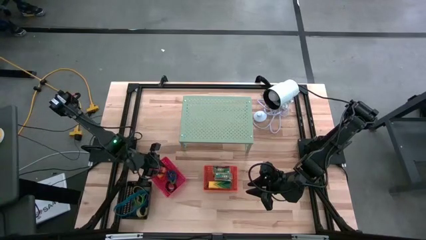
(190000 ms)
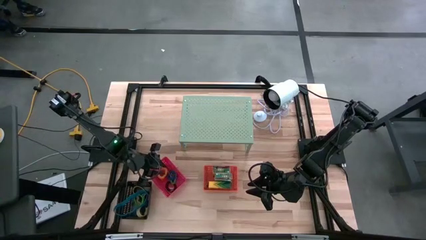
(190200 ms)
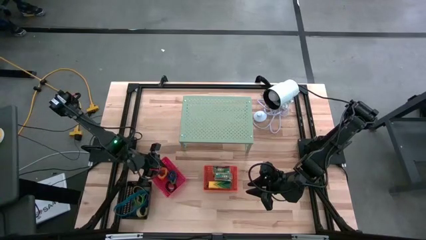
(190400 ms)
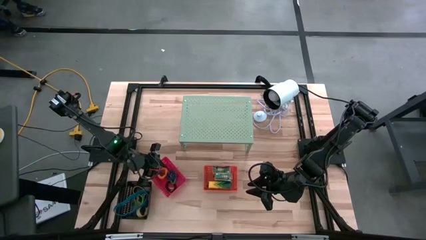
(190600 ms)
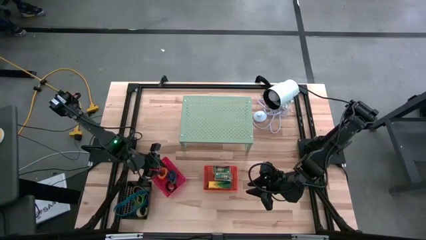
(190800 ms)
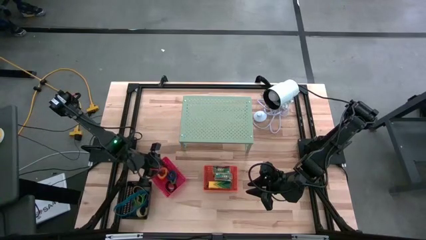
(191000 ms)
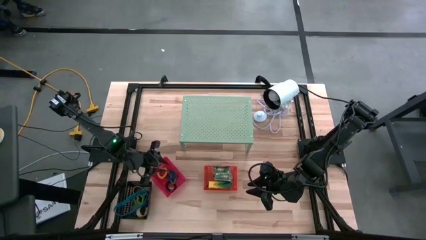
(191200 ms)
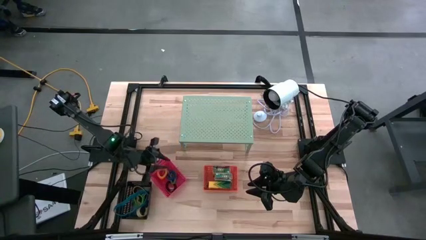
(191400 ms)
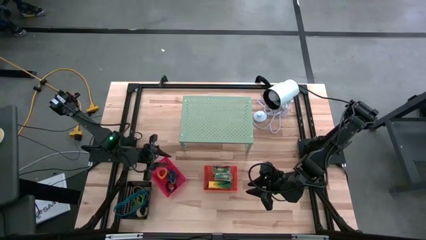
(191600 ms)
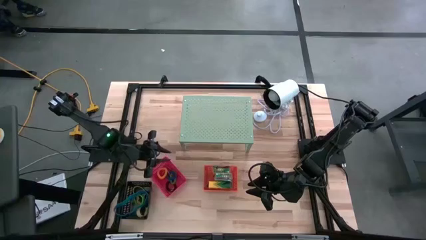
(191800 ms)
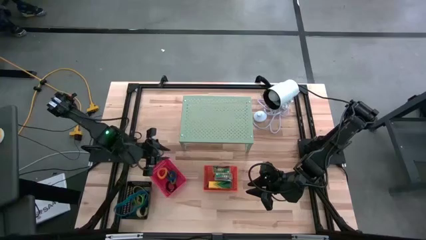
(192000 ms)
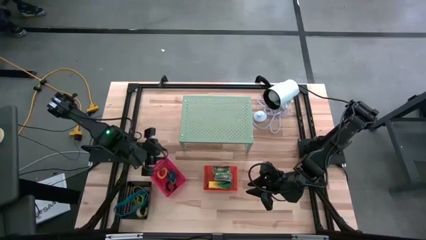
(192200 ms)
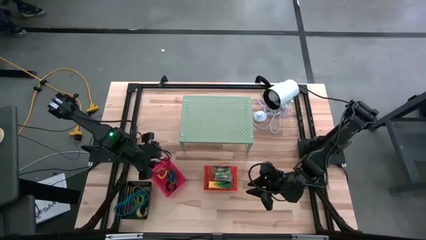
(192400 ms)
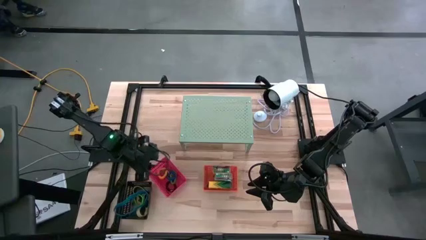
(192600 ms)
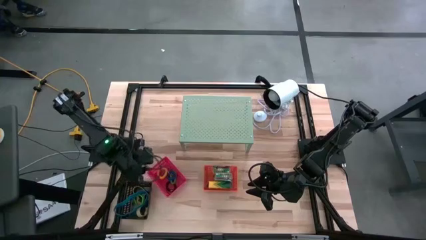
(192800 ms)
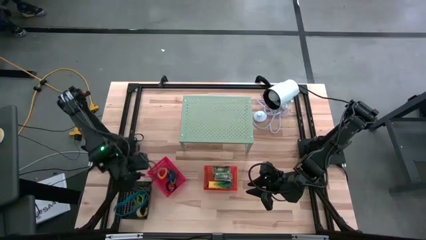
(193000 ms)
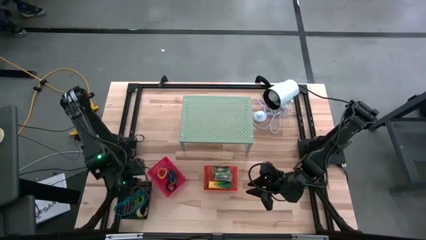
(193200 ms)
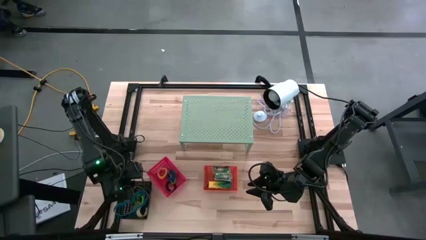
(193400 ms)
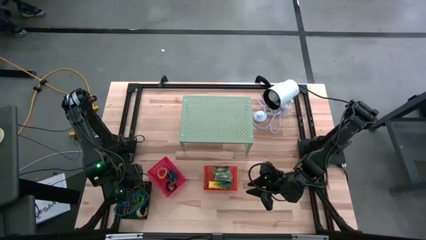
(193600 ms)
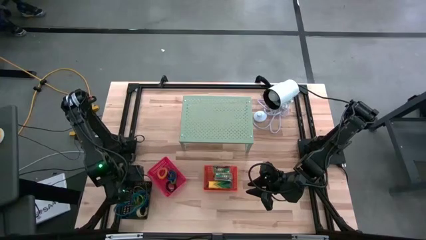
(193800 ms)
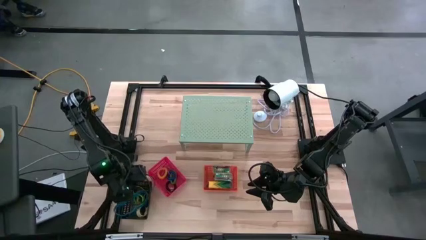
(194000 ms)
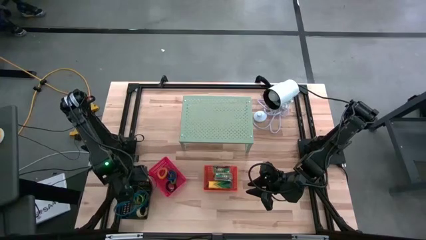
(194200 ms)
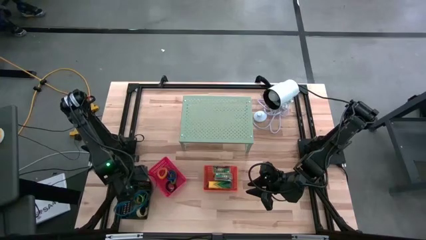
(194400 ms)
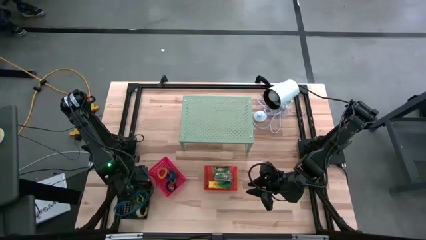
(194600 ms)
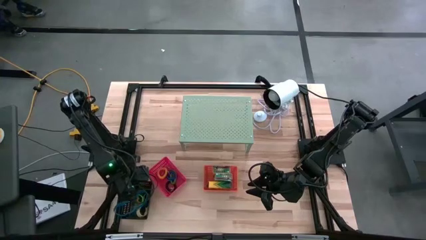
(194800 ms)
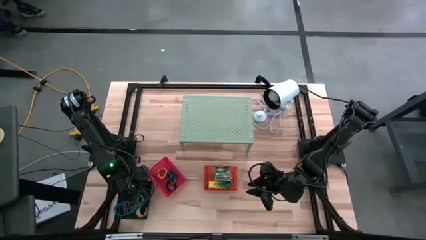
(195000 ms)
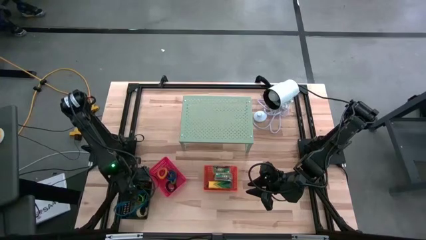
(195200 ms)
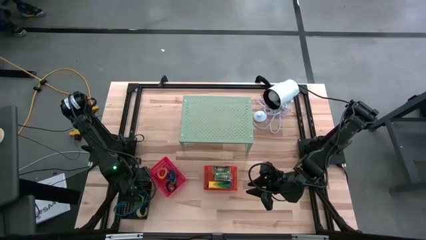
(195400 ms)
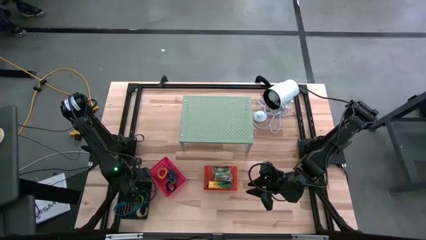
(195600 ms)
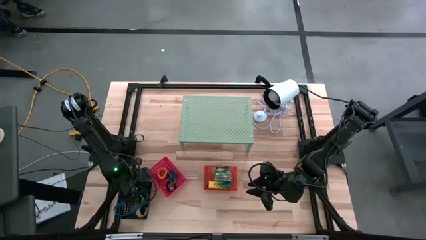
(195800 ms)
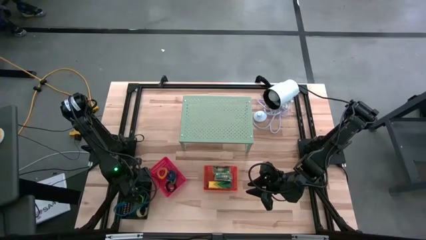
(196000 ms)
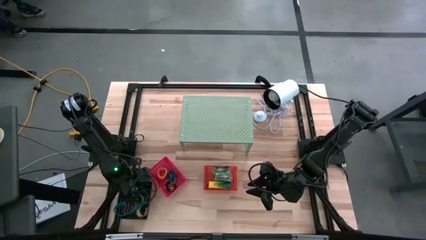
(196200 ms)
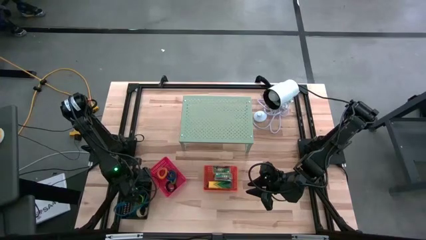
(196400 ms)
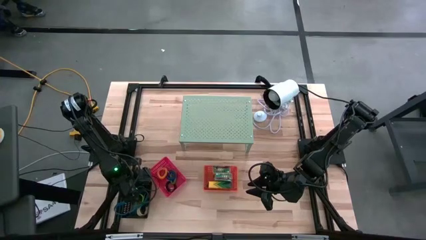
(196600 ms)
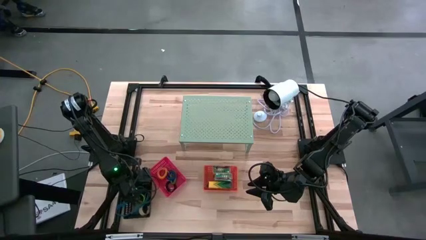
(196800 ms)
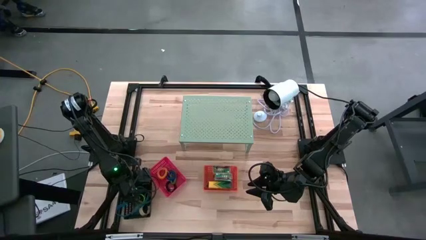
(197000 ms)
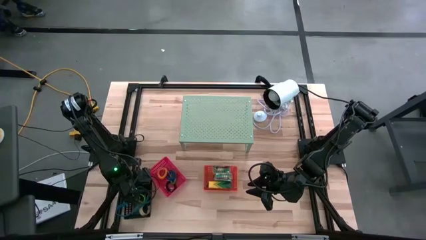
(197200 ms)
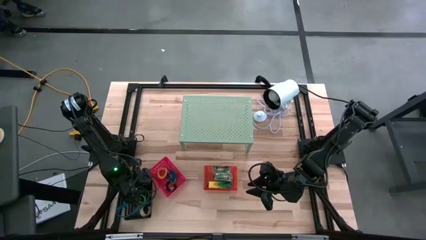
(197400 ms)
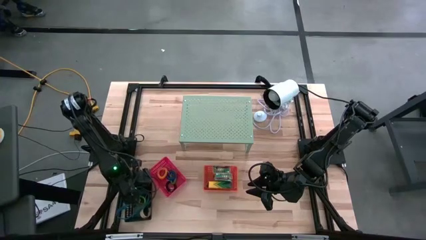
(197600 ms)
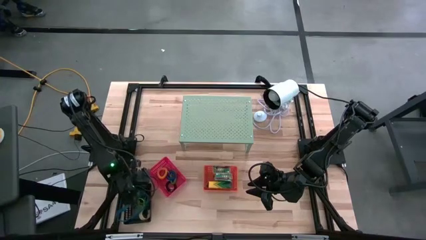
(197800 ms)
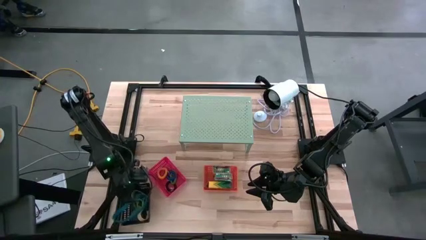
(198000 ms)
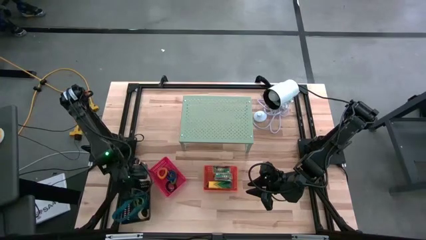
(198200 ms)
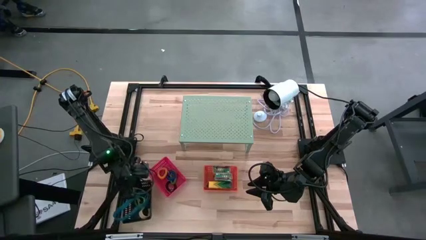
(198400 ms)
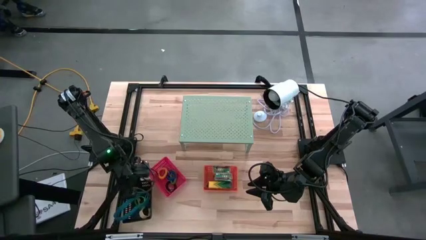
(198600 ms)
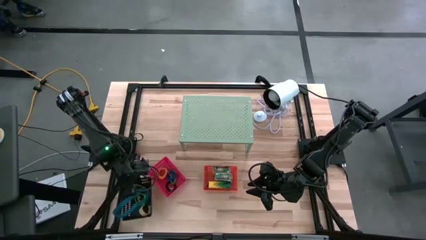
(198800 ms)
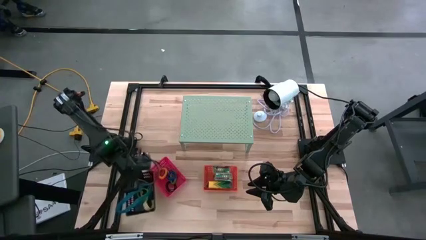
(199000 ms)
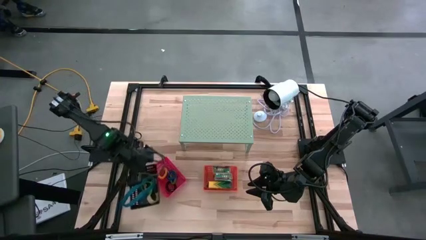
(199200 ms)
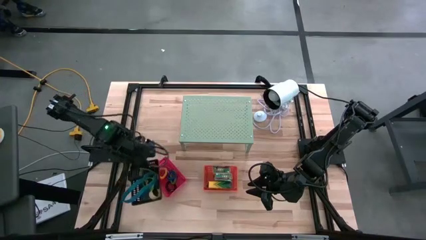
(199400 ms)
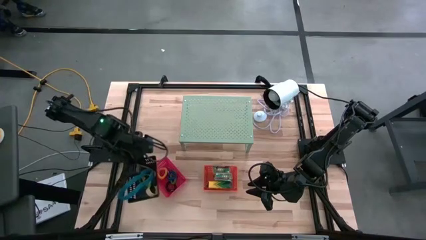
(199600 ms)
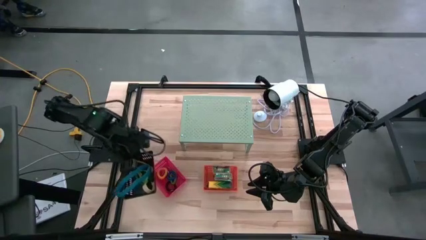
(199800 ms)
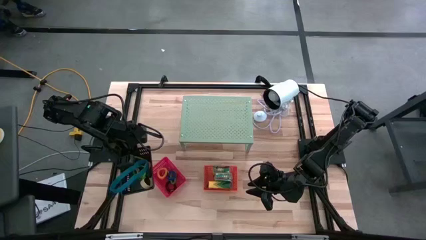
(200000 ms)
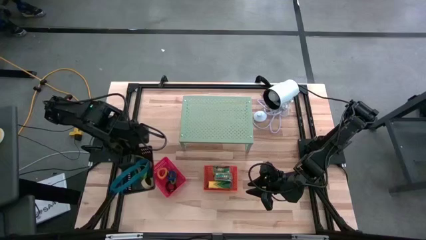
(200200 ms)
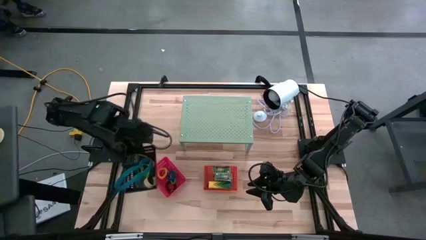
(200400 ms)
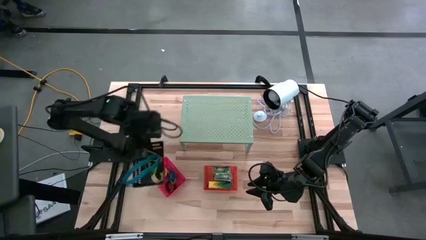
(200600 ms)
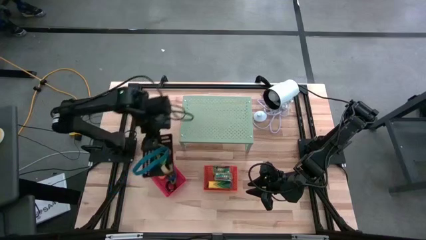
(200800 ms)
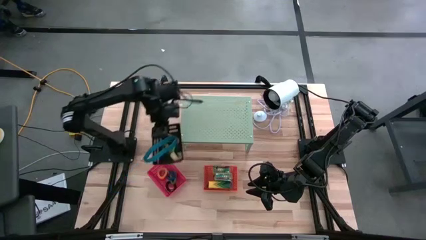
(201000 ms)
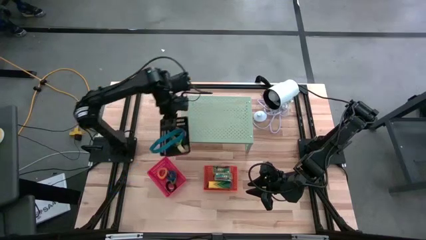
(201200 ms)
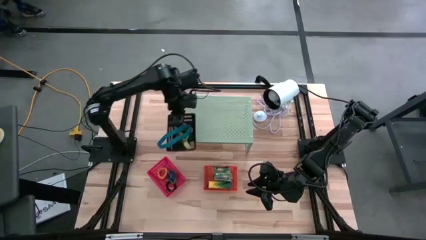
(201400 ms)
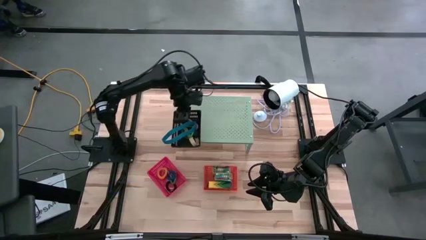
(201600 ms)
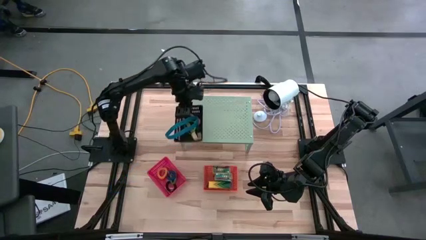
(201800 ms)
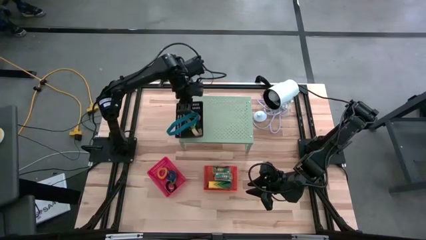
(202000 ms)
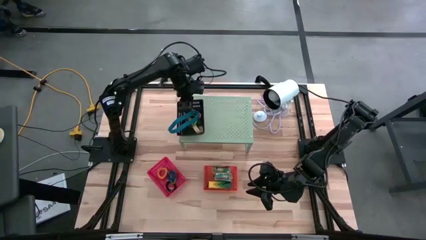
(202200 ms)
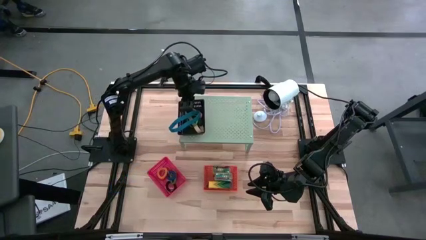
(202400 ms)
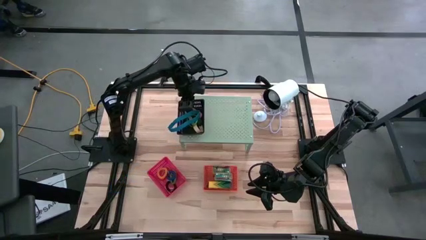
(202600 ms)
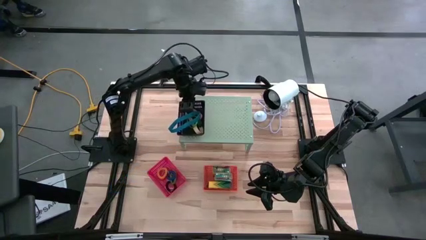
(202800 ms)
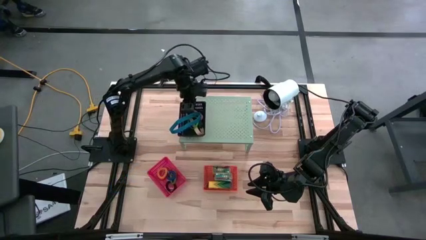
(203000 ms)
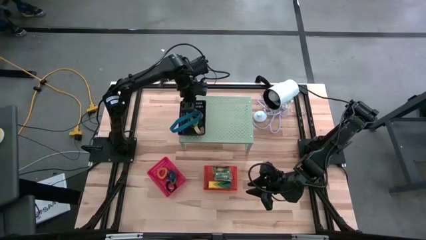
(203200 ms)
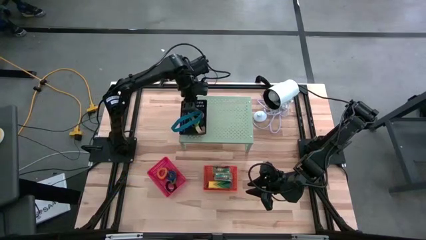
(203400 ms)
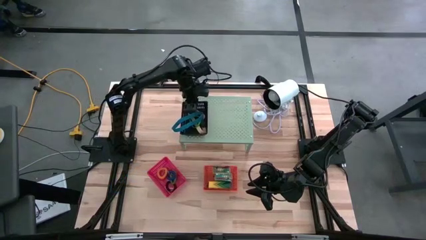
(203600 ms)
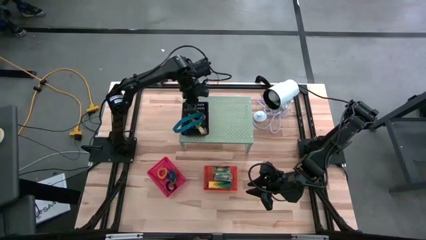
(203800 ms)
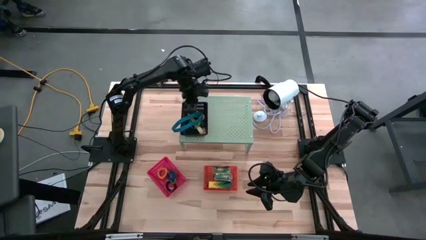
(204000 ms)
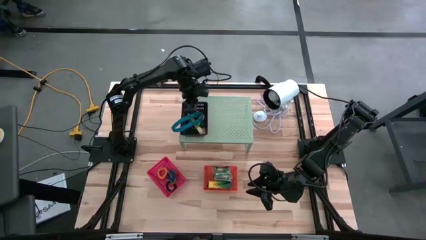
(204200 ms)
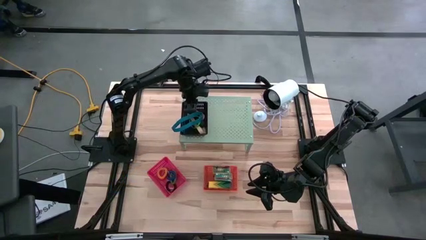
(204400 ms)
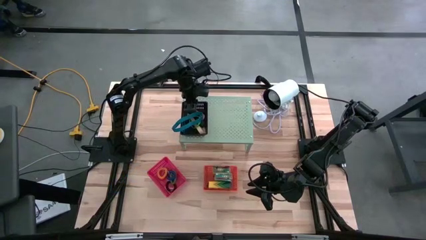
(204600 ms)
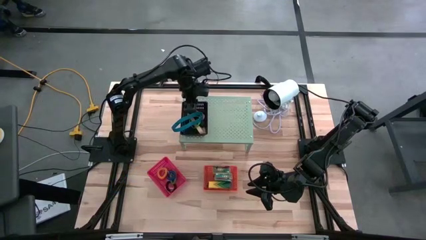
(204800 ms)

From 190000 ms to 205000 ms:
Task: Pick & Place Office Desk Supplies
Put the black bin with rubberbands on the shelf

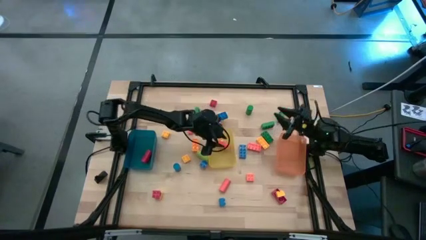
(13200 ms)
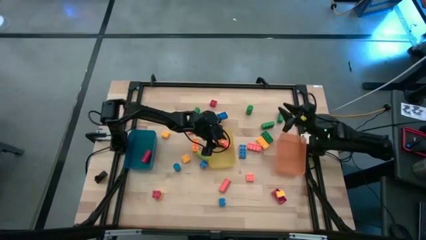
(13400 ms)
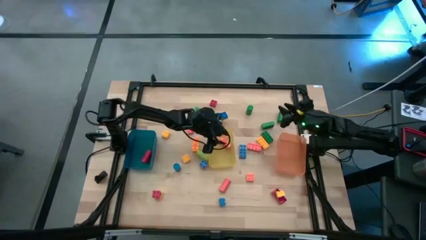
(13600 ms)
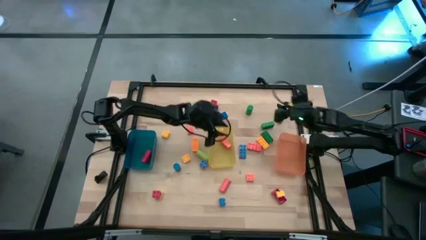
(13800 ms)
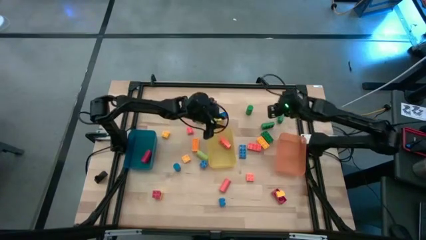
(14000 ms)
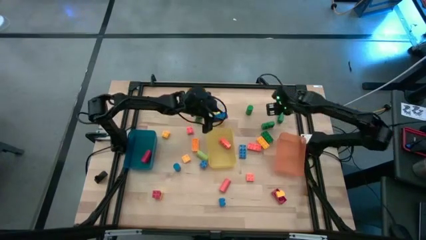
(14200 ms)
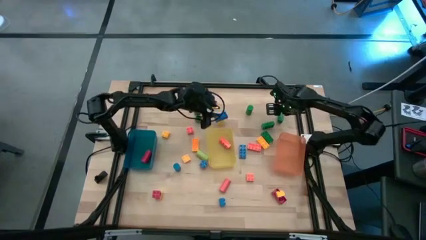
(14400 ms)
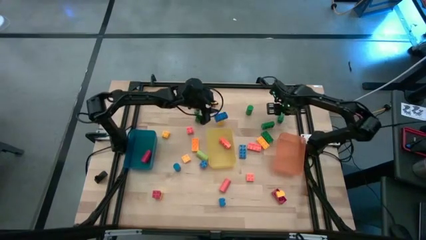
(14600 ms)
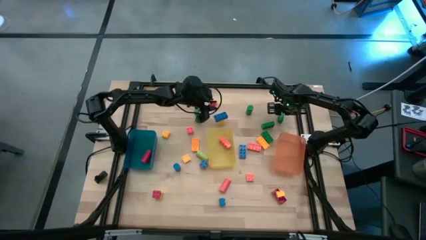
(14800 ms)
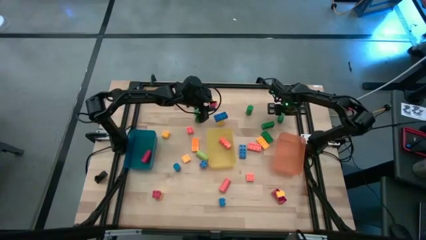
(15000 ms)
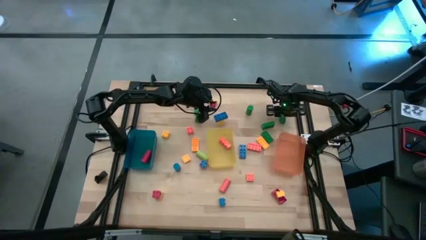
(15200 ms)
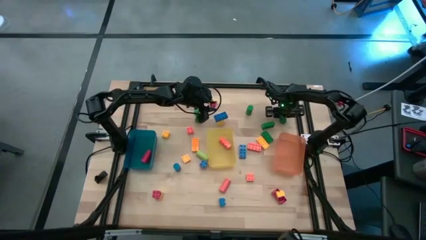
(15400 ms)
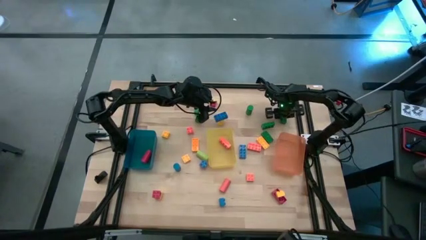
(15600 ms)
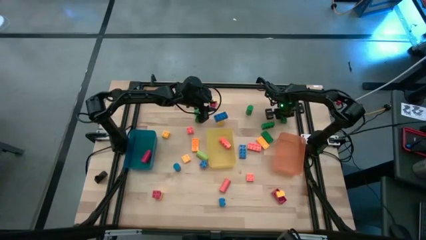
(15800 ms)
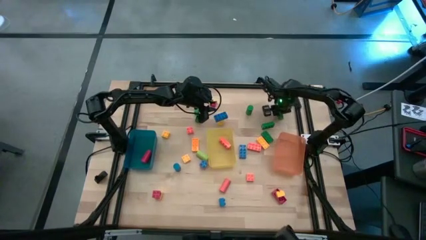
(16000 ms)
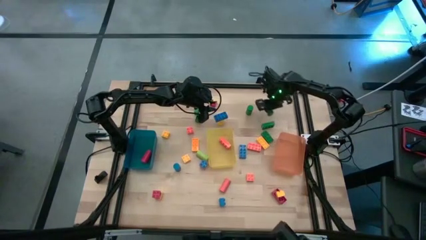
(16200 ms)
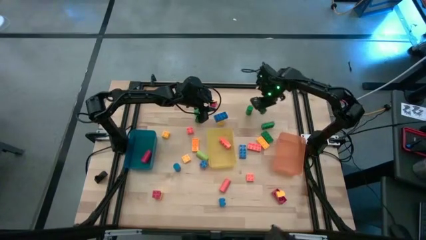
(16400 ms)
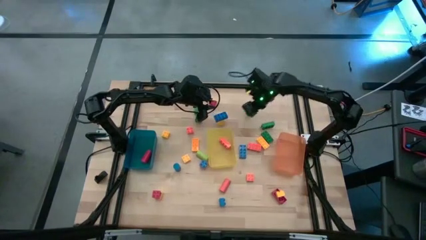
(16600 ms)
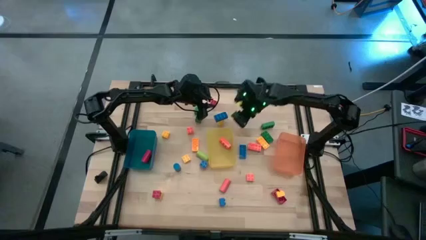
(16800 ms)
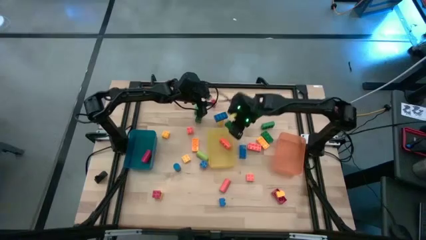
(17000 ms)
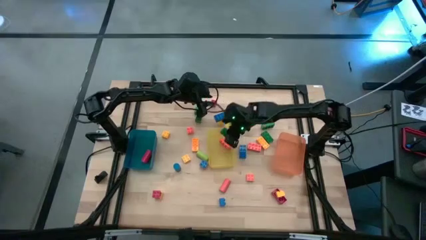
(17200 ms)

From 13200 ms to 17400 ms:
Task: Sort blocks by size
Put the green 8 stud game piece into the yellow bin
